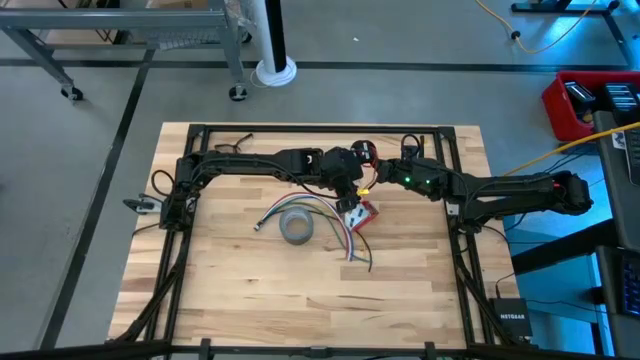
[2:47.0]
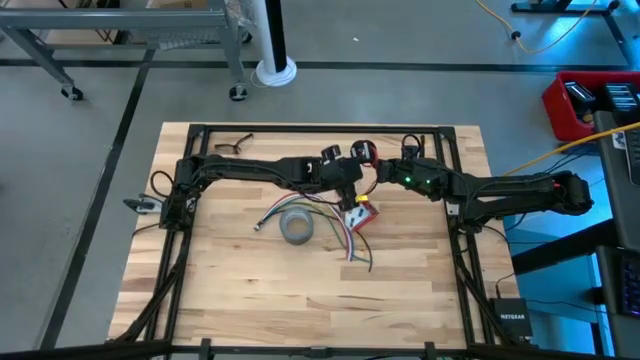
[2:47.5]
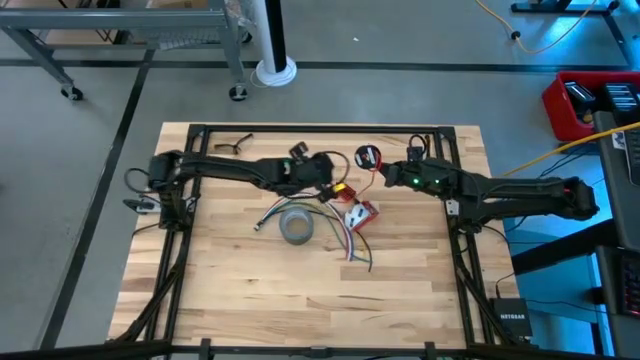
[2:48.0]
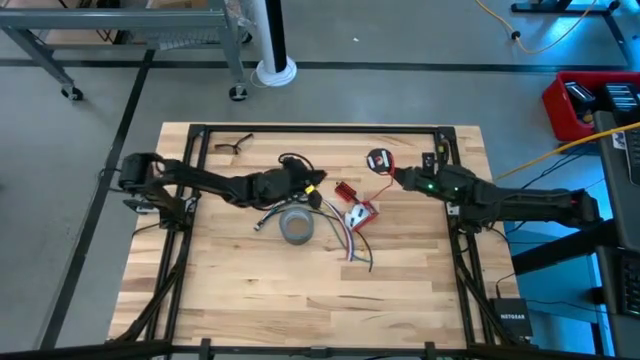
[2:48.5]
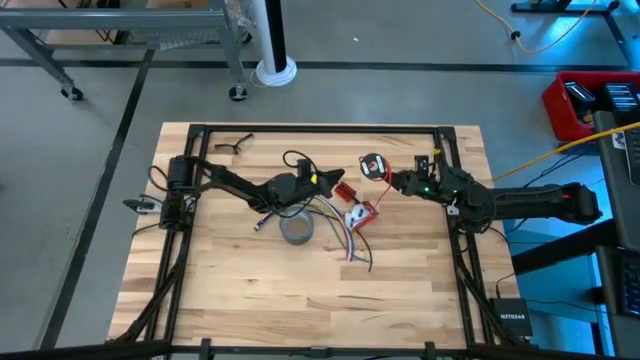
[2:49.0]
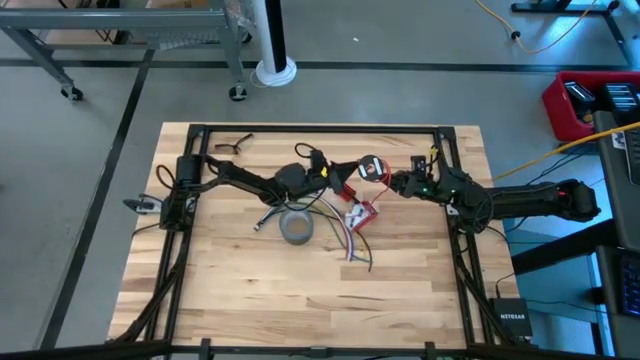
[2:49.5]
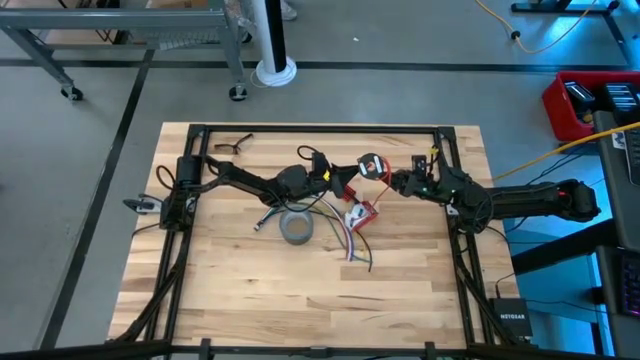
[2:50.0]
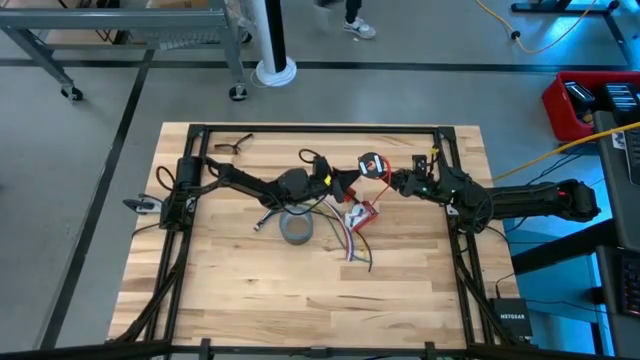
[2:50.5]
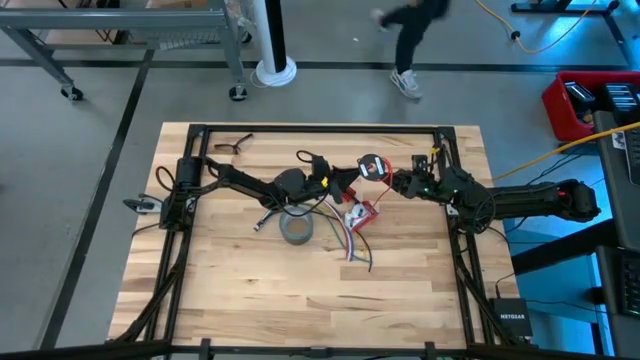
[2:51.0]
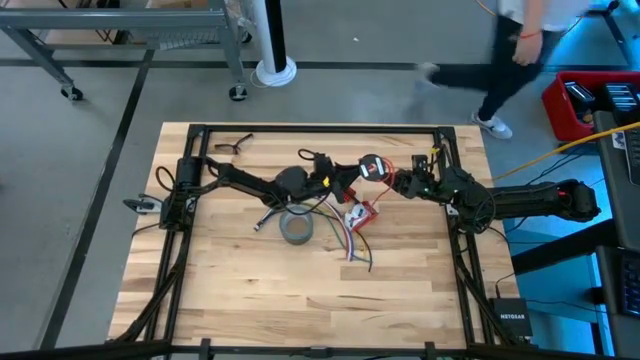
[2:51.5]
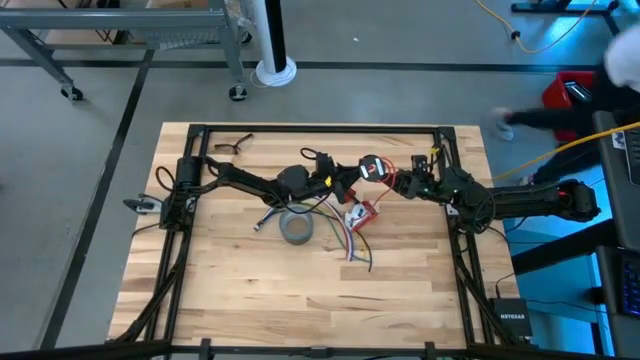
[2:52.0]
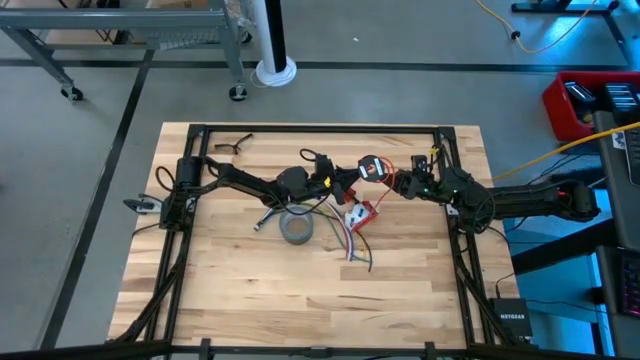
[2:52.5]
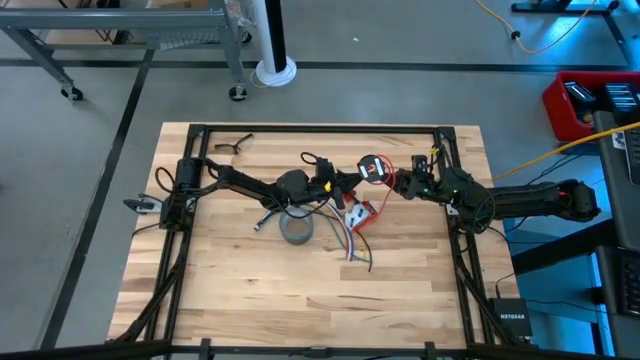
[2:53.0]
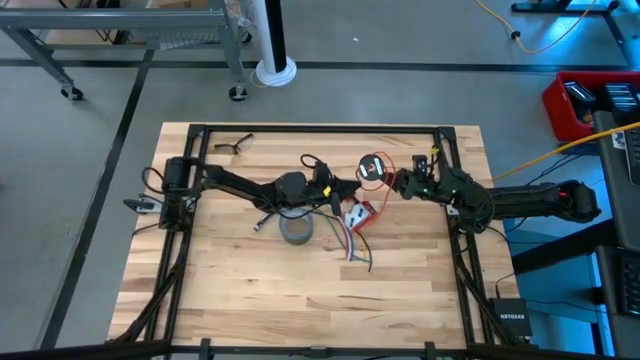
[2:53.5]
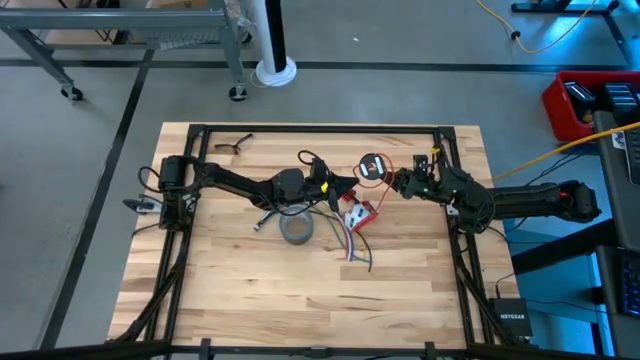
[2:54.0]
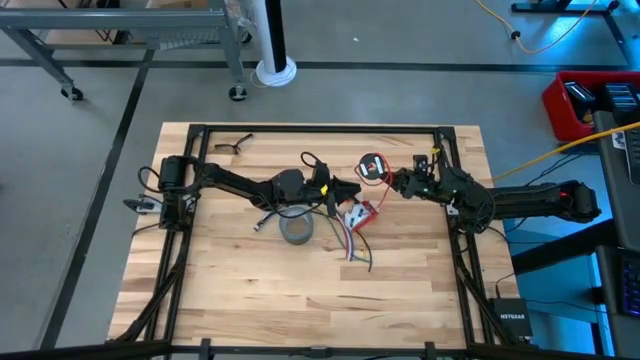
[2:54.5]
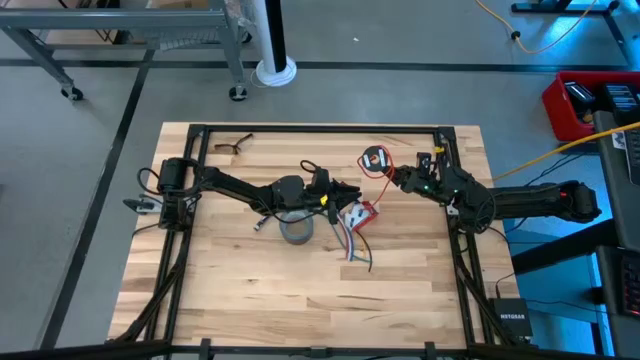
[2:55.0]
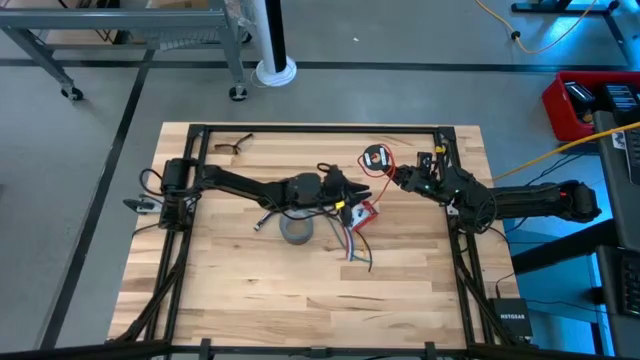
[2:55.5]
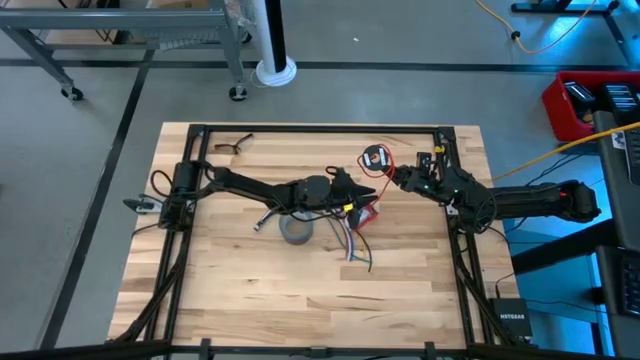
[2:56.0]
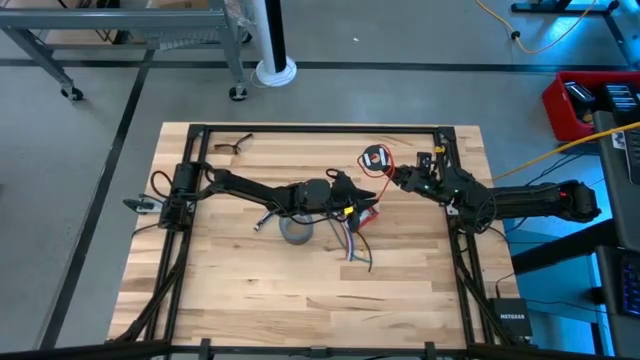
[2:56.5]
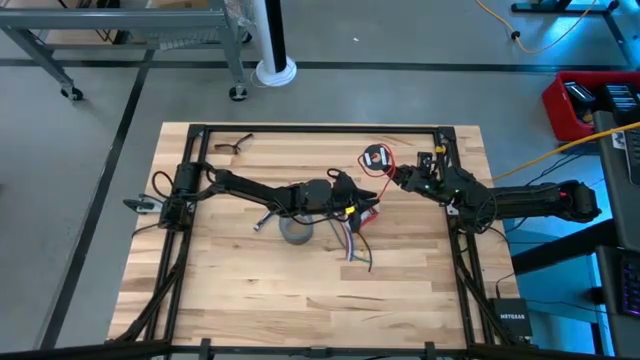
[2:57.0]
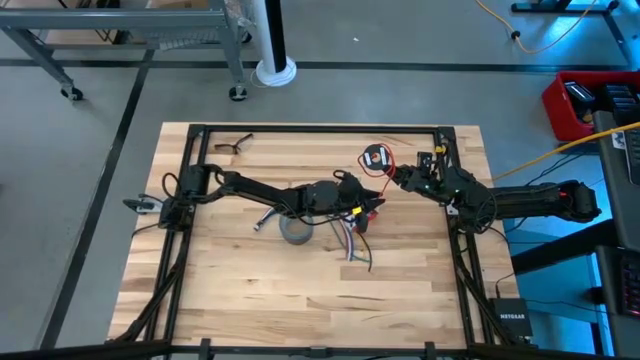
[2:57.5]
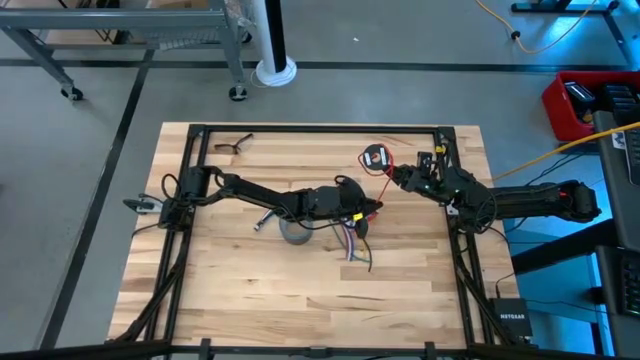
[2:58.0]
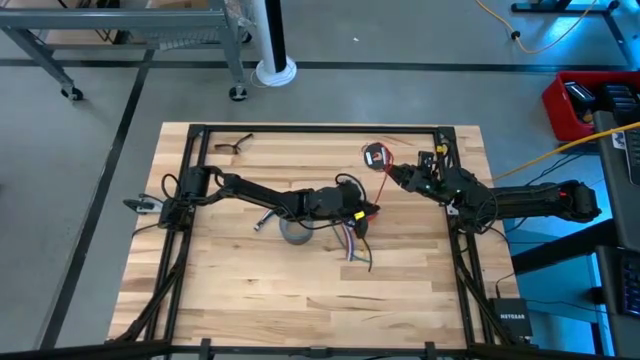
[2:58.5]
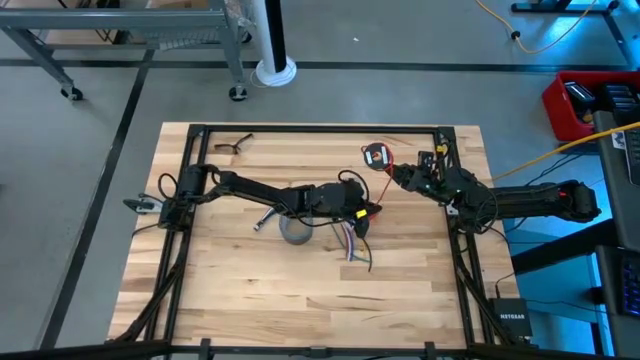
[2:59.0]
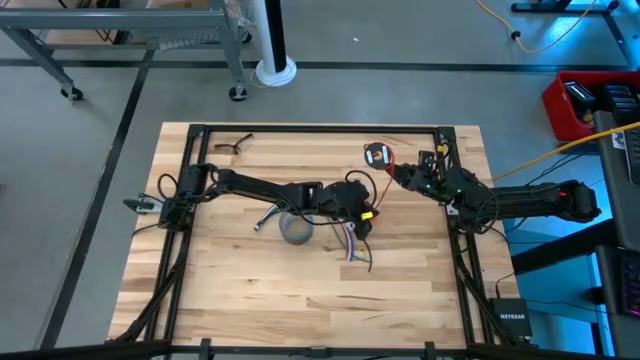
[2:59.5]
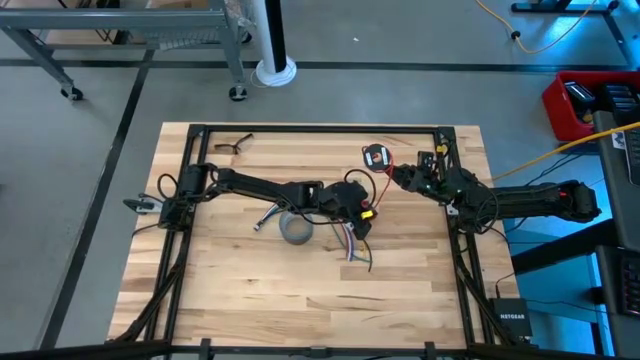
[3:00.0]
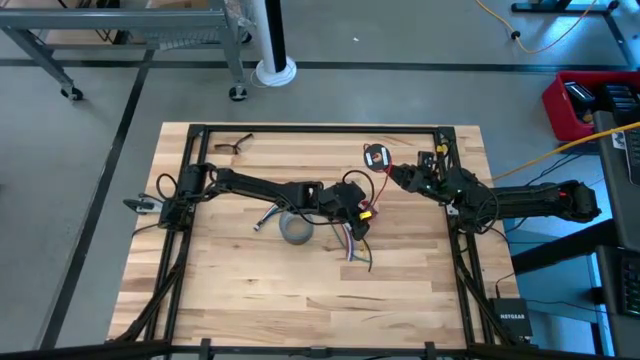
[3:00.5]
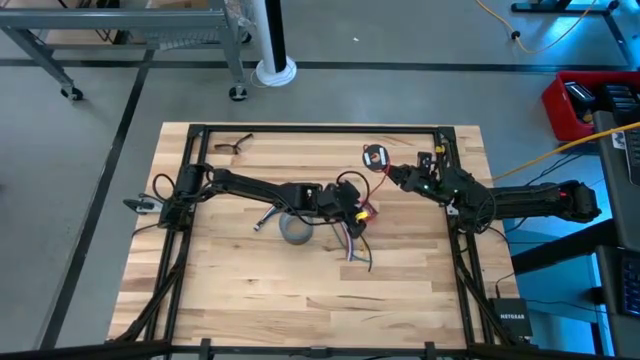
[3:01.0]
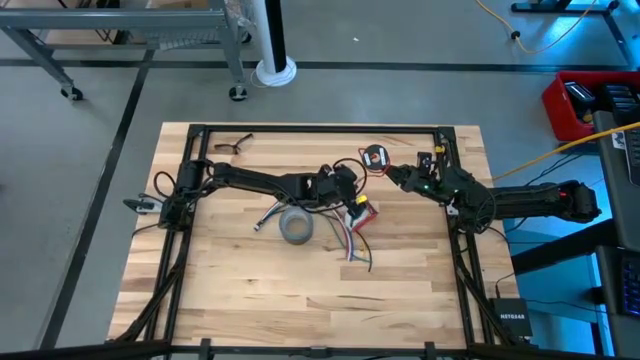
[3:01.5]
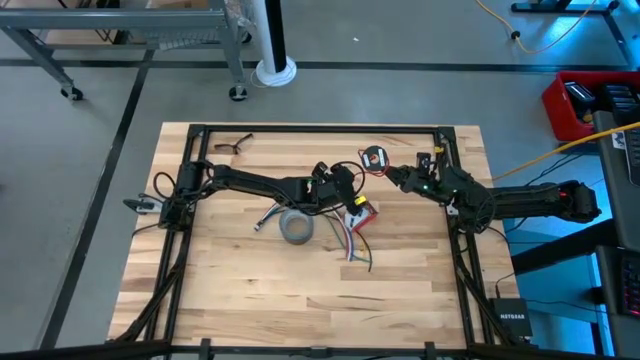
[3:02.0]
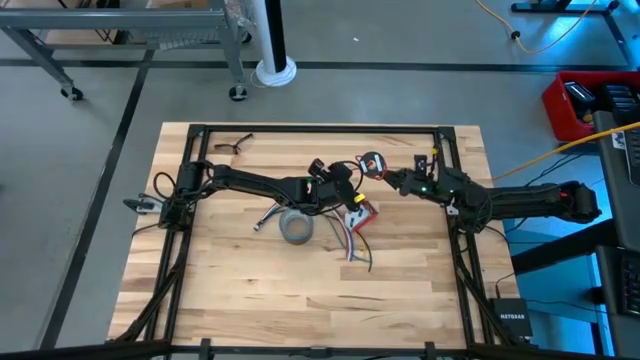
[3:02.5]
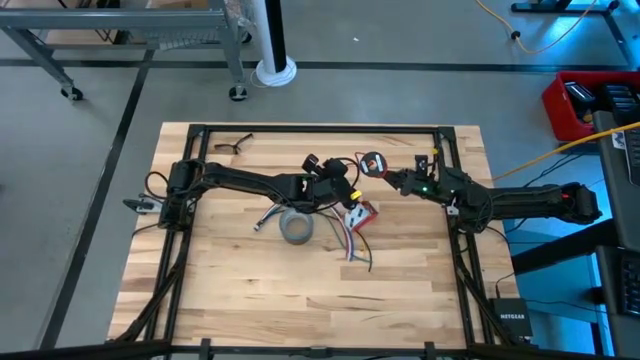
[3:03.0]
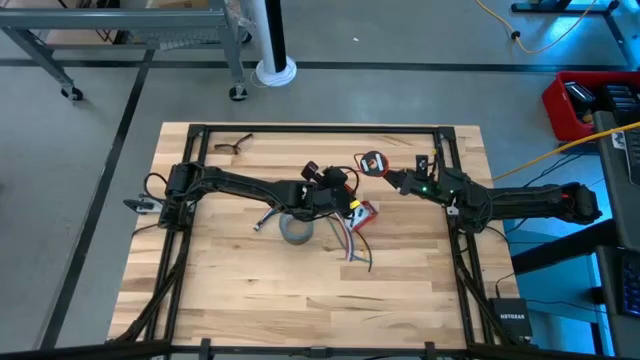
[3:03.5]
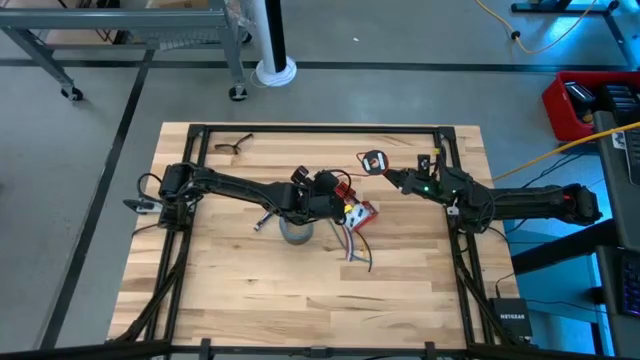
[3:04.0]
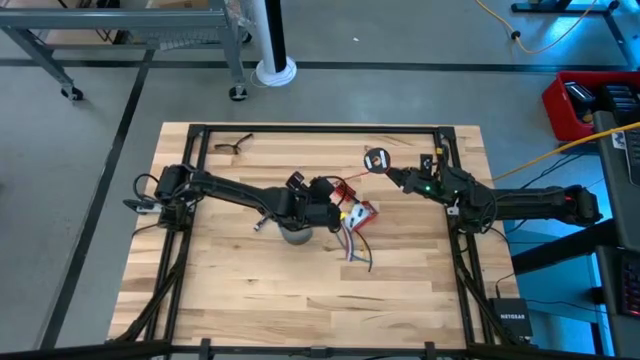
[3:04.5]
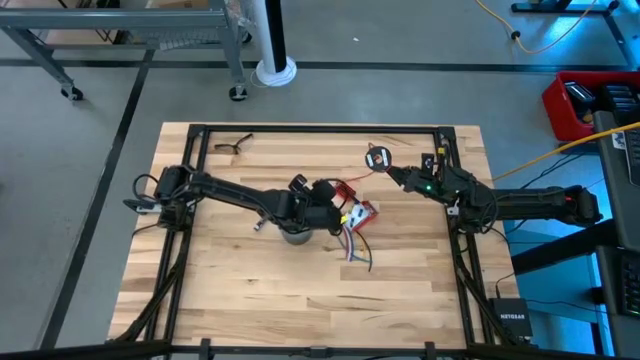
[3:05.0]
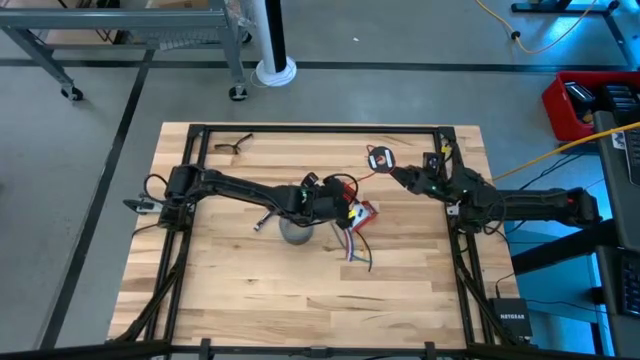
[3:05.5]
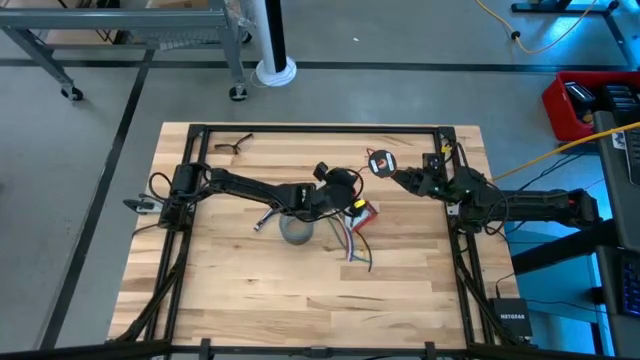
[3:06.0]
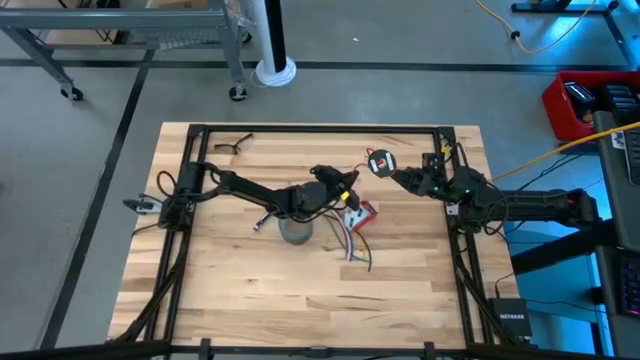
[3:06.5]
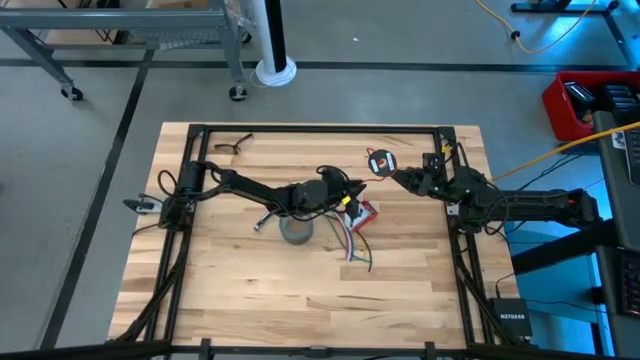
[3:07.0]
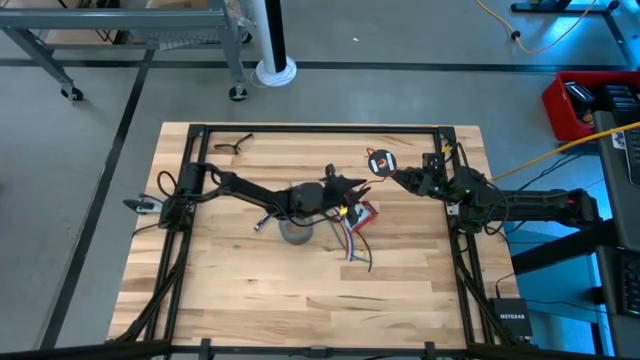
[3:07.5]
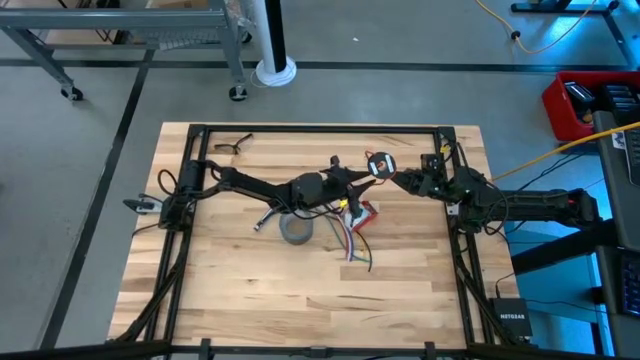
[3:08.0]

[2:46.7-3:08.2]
Task: Coil cords
Coil the red wire on the black spool
